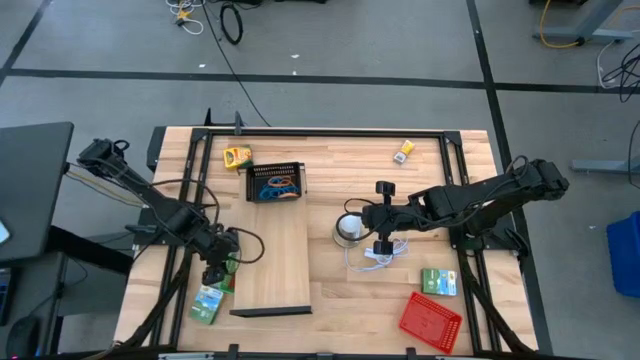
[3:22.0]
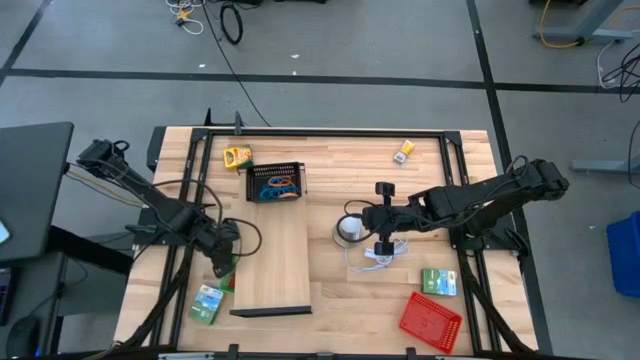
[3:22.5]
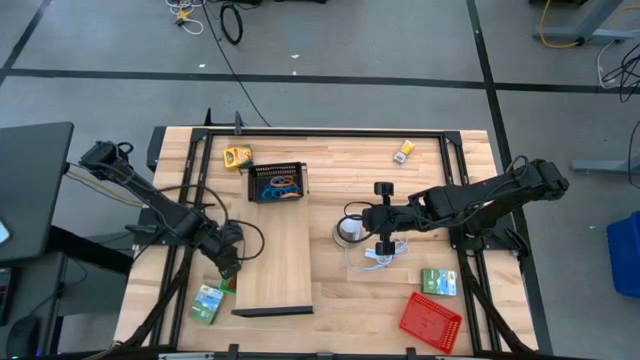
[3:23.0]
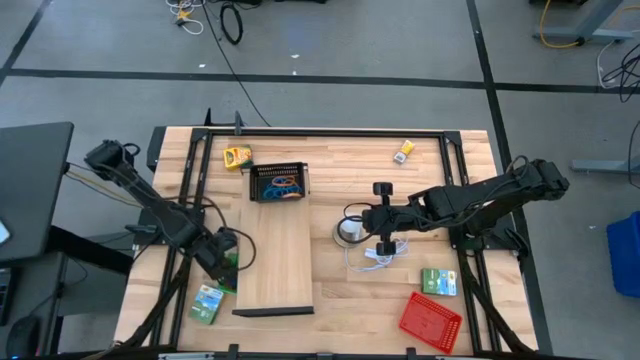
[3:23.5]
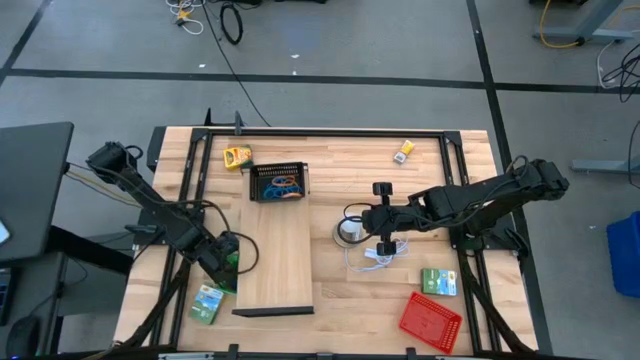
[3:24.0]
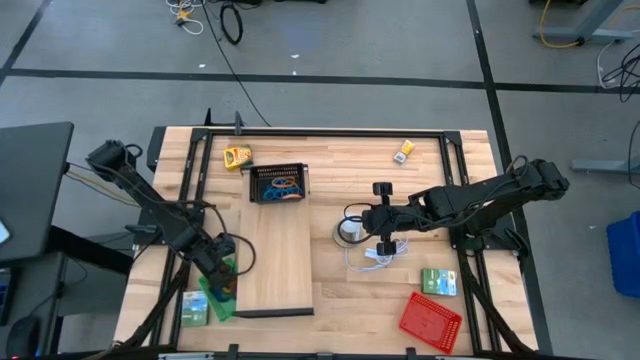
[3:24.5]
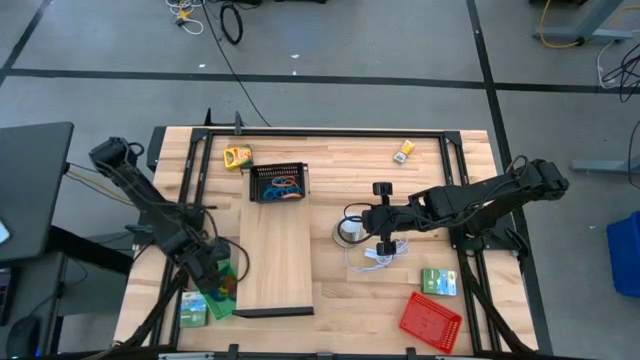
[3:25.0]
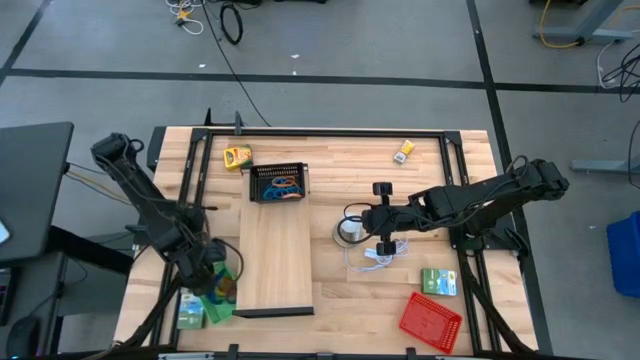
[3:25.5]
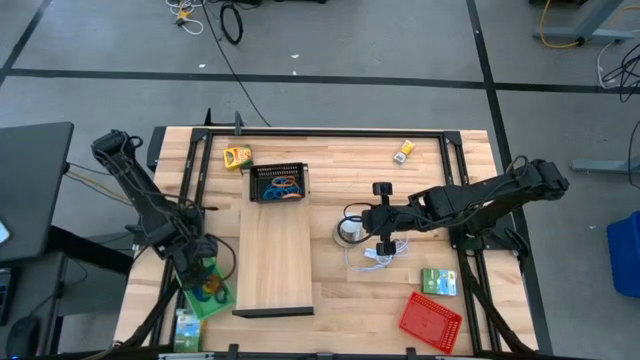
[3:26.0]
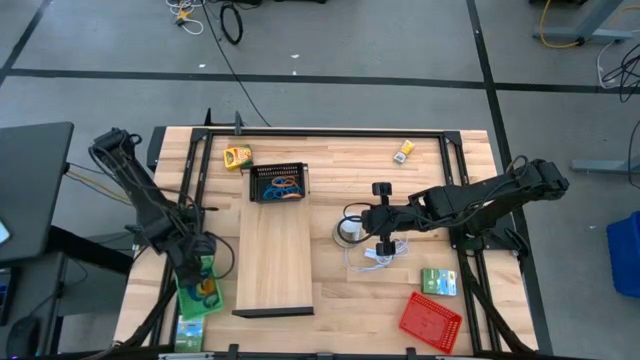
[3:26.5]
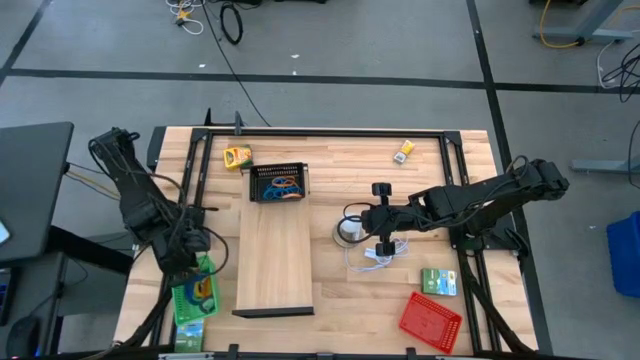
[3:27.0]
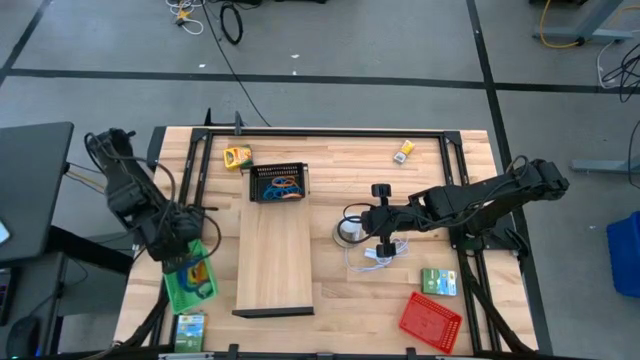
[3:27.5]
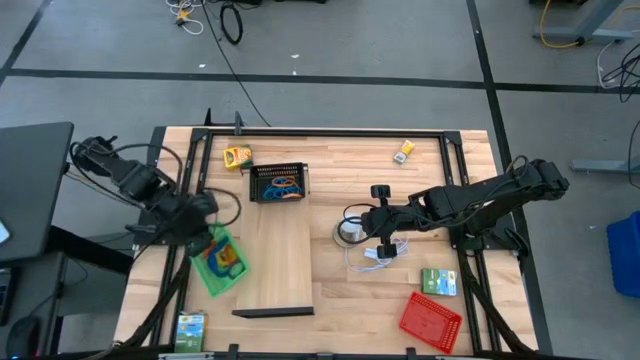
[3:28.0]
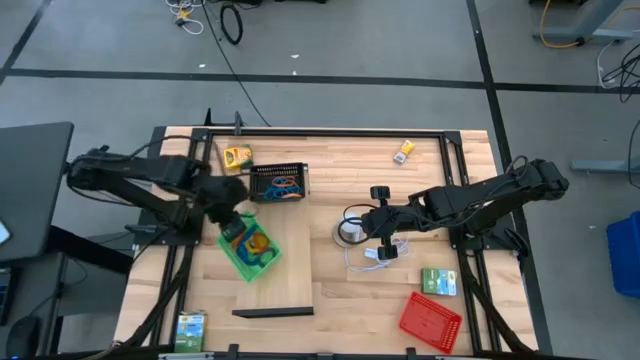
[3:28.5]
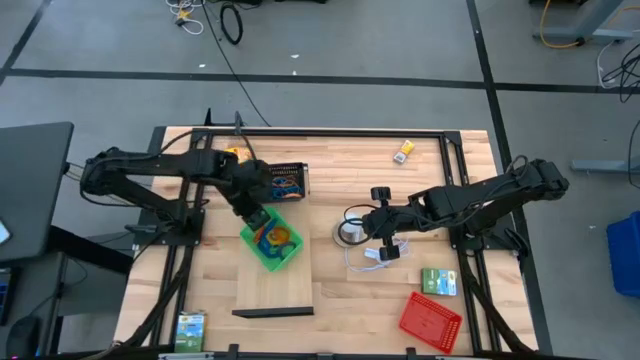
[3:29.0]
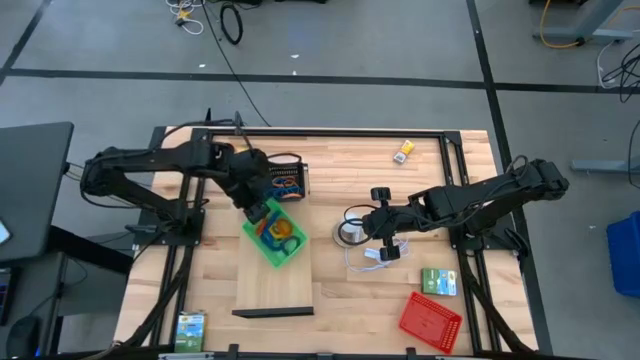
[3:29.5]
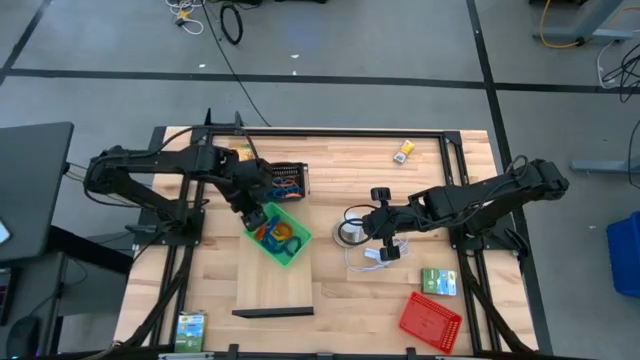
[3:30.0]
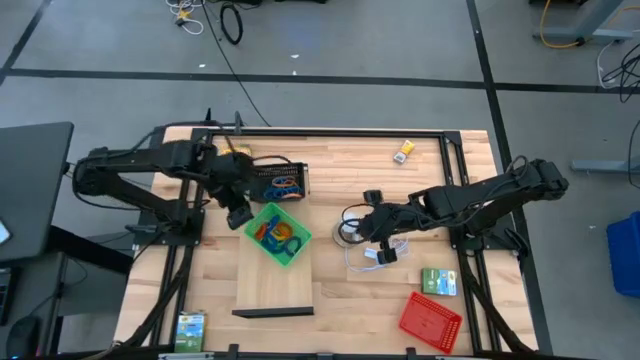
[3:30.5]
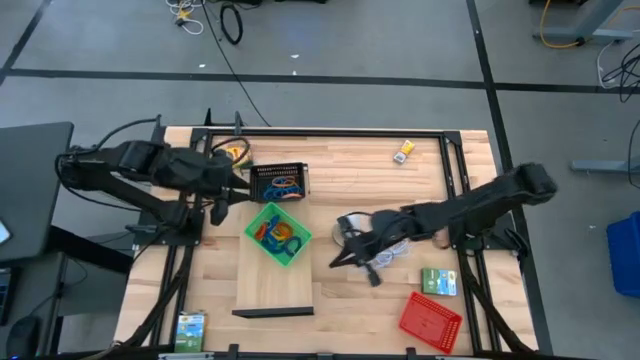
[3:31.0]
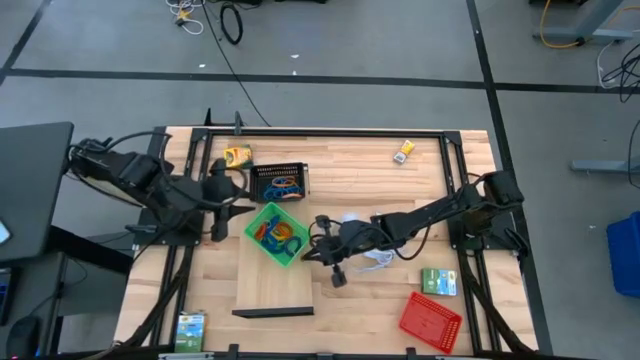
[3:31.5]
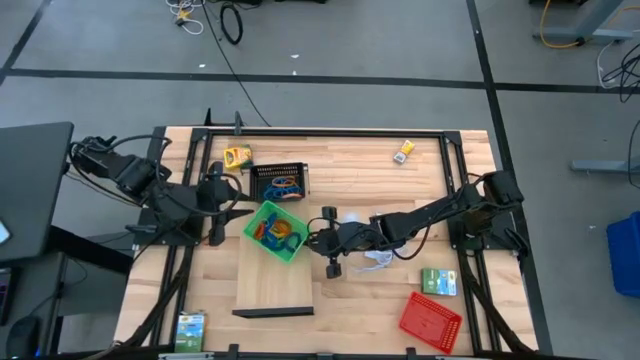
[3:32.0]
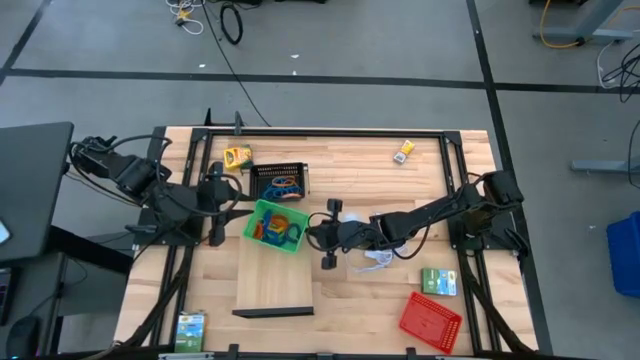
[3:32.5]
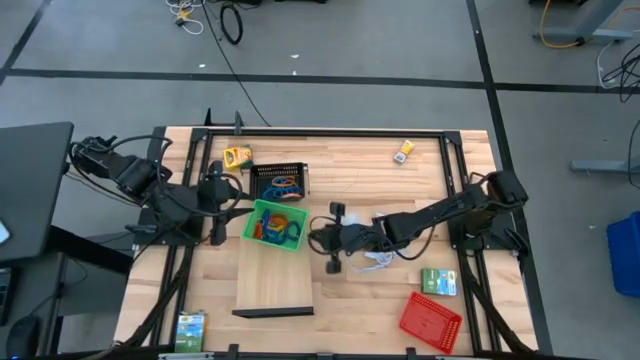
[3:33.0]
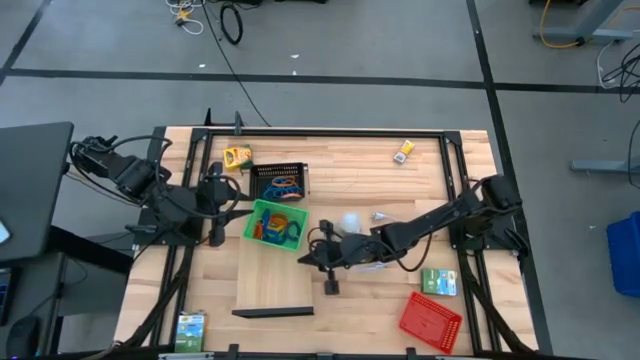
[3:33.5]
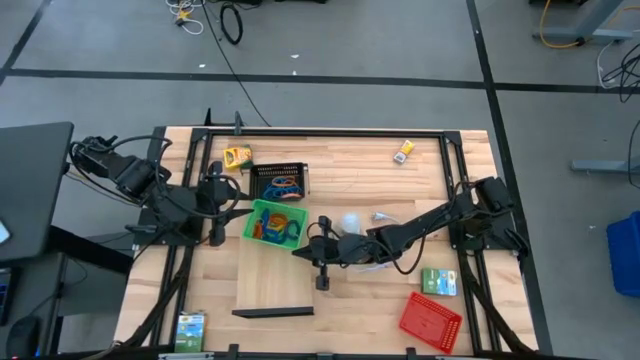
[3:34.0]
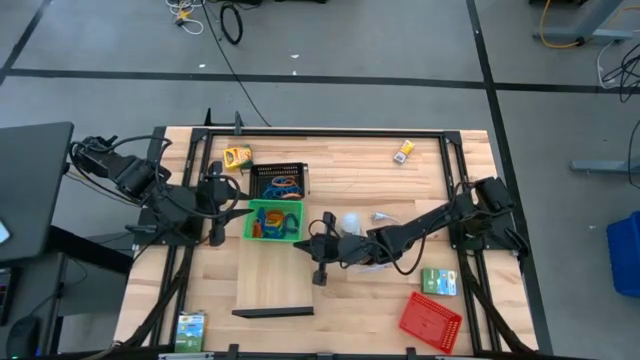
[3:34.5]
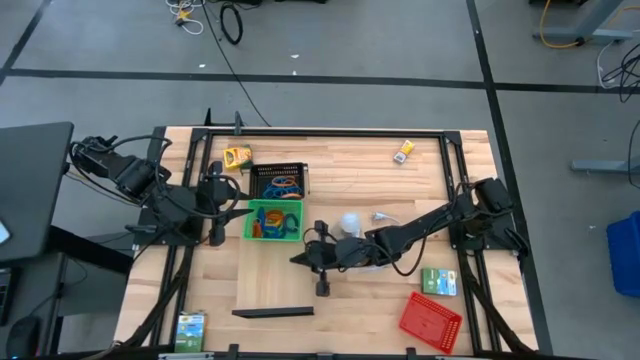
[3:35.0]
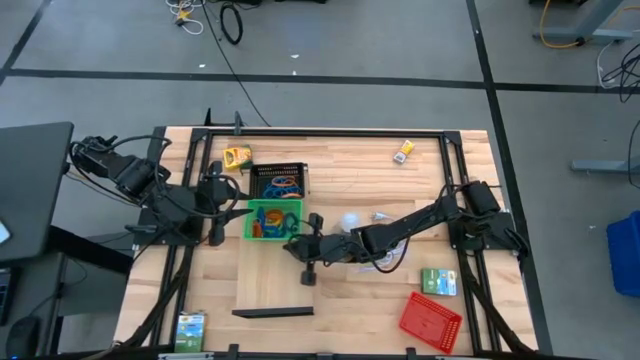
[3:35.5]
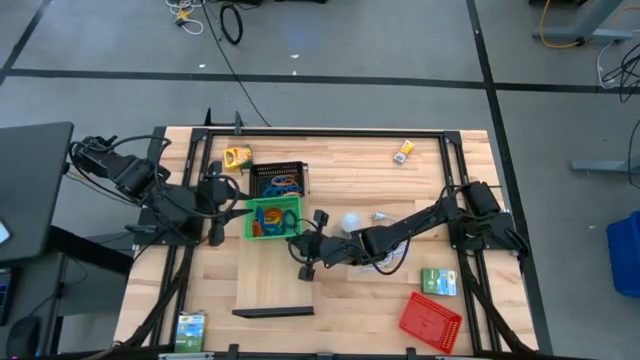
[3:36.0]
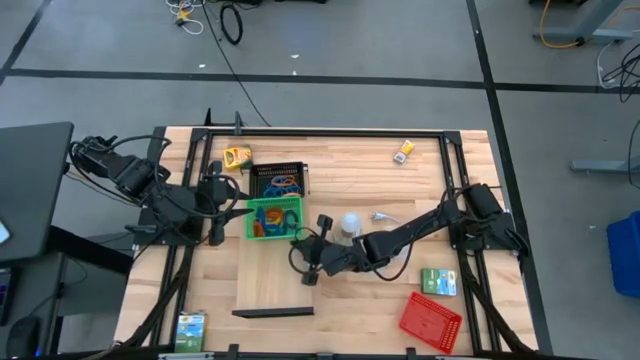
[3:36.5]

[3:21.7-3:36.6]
Task: Pick & Place Office Desk Supplies
Put the green bin on the shelf

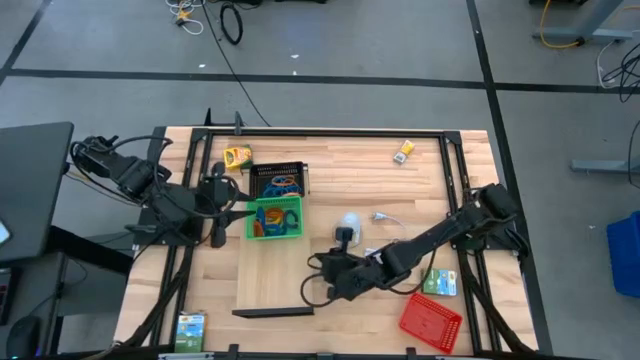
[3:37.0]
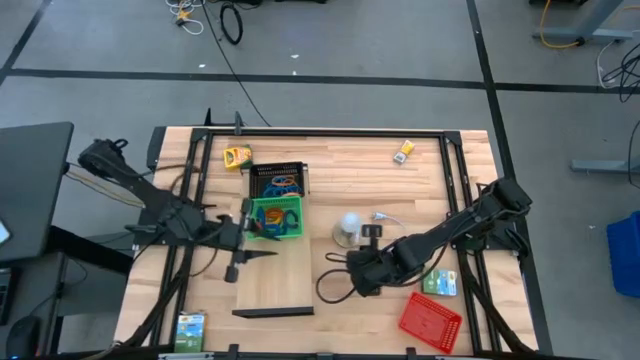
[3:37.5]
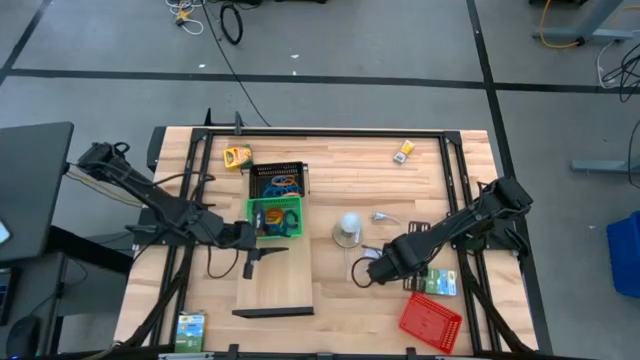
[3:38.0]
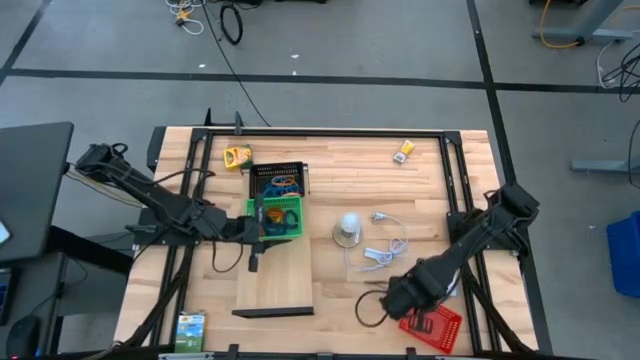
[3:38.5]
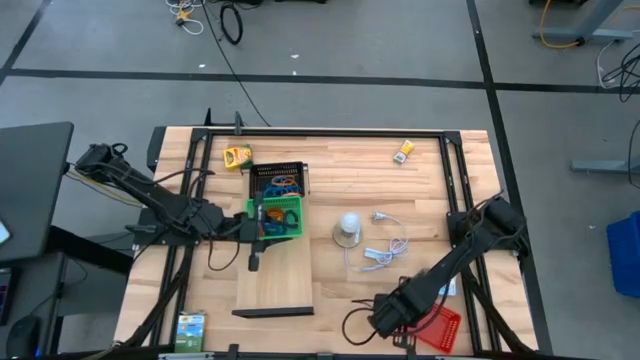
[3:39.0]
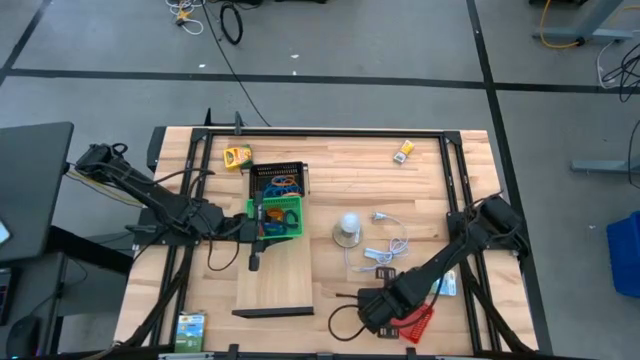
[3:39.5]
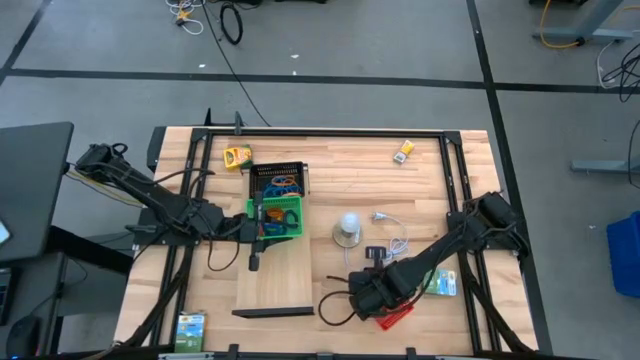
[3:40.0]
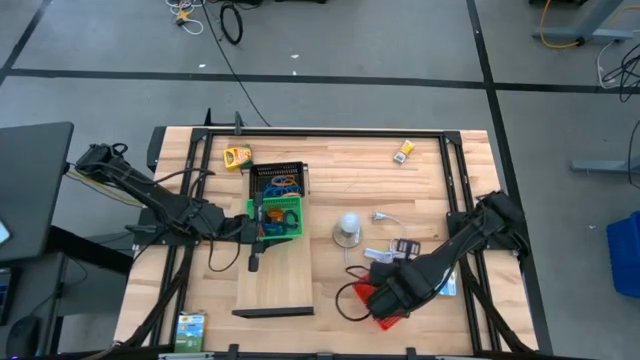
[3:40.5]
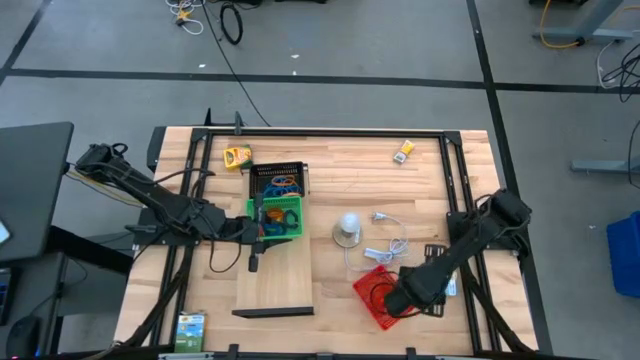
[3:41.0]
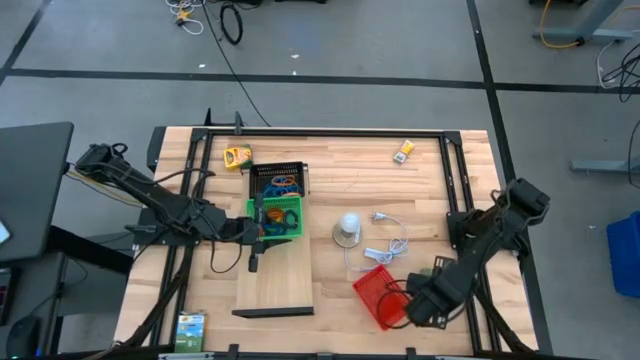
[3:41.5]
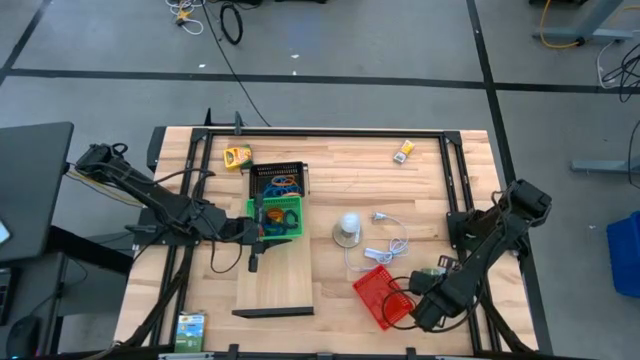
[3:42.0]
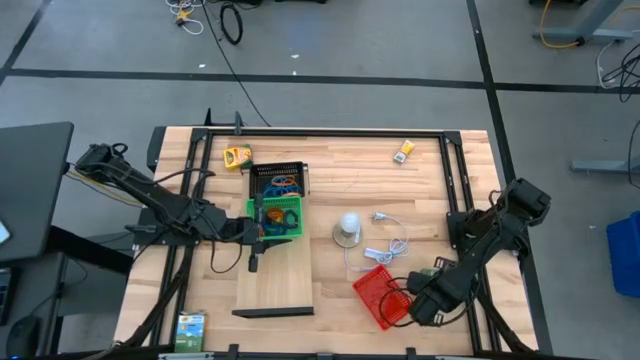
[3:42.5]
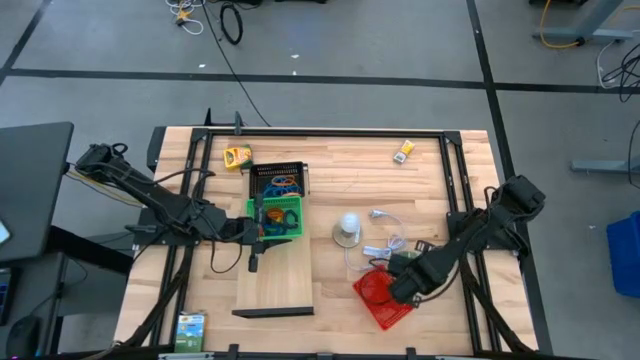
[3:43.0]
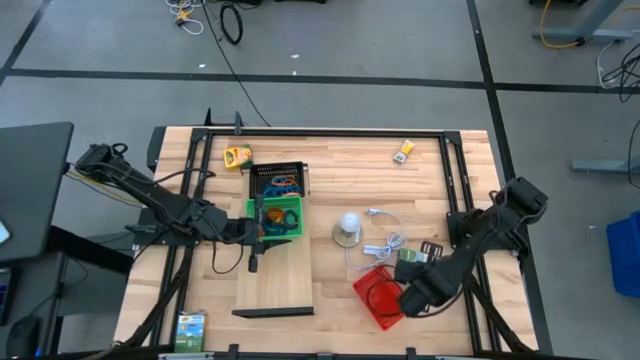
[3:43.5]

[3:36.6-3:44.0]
Put the box of crayon into the red bin
